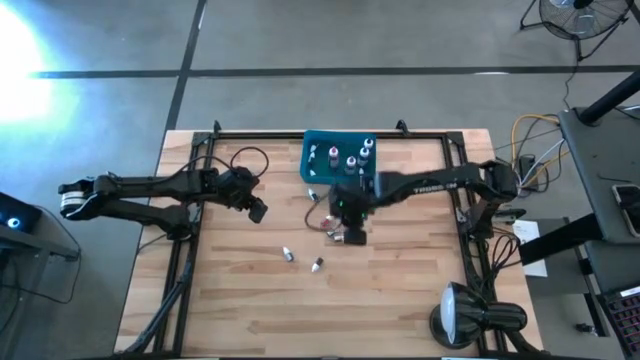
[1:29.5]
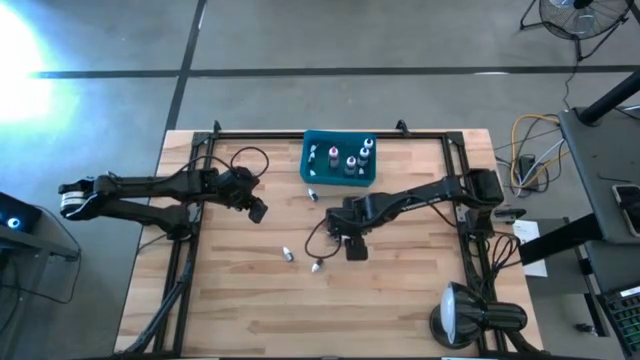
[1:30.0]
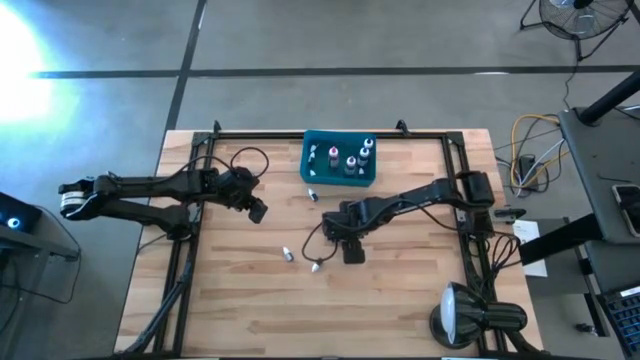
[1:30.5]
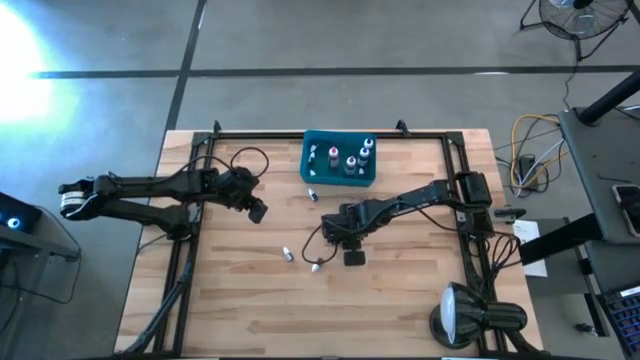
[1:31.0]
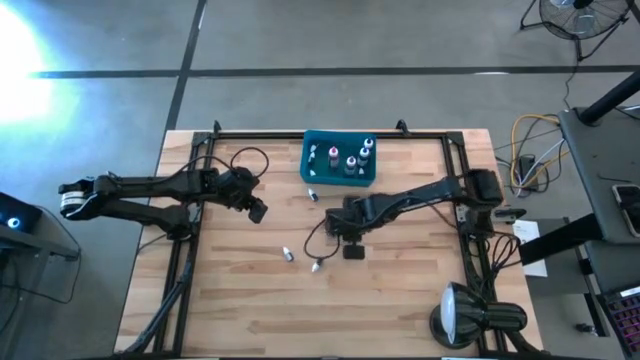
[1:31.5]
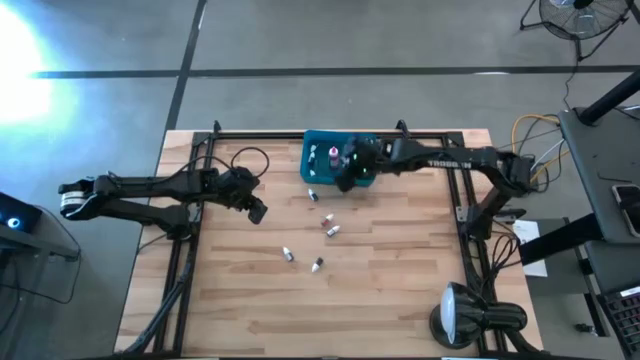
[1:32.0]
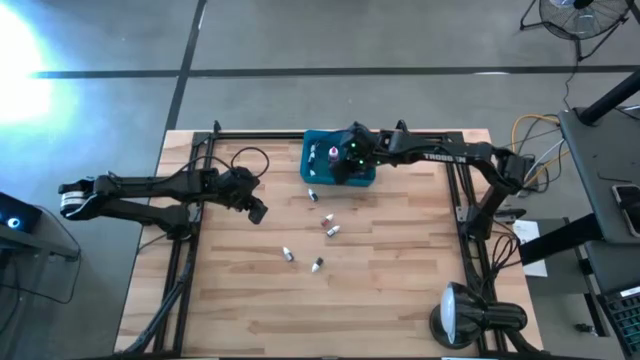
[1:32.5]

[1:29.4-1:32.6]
Task: Pick & Place food coloring
Put the bottom small red food coloring bottle into the blue bin

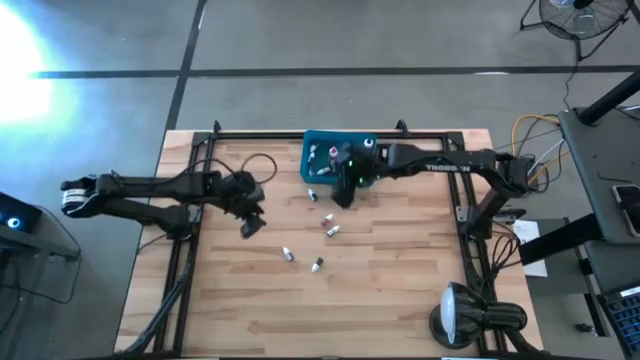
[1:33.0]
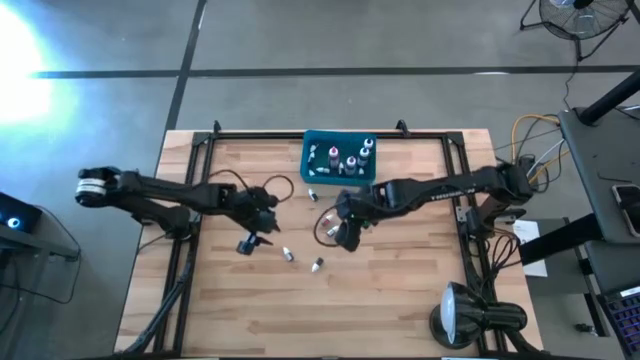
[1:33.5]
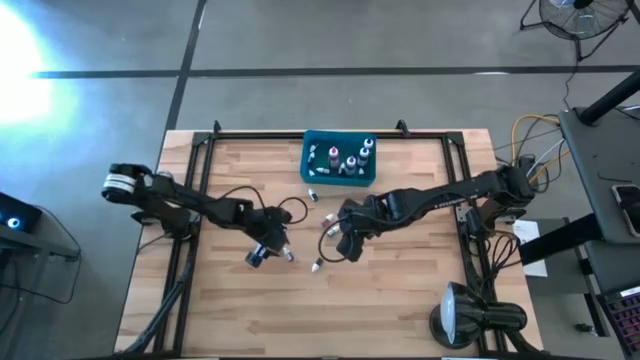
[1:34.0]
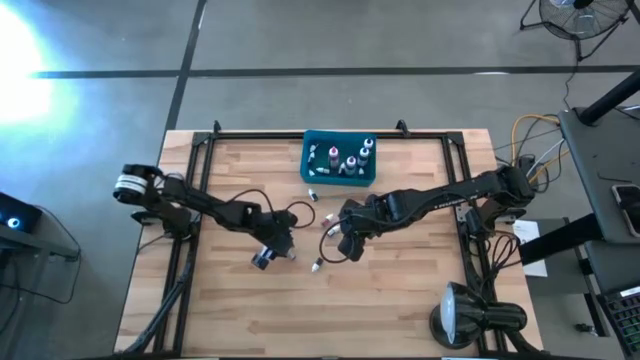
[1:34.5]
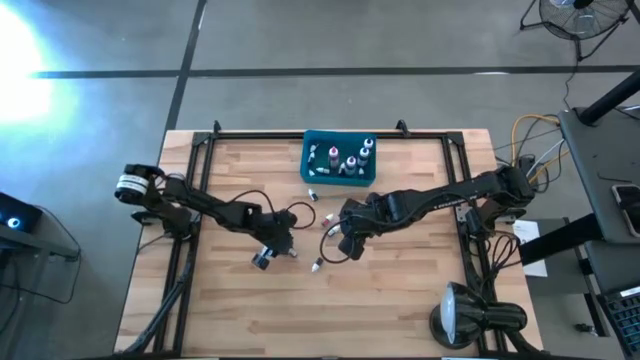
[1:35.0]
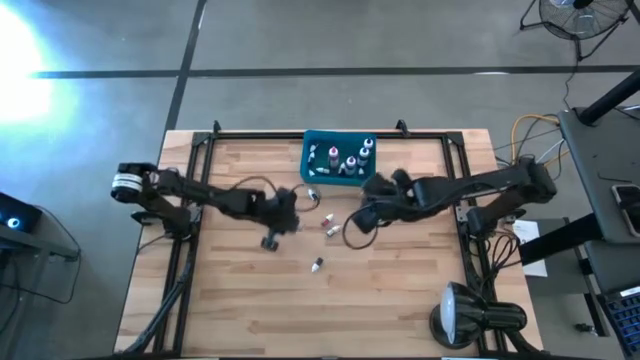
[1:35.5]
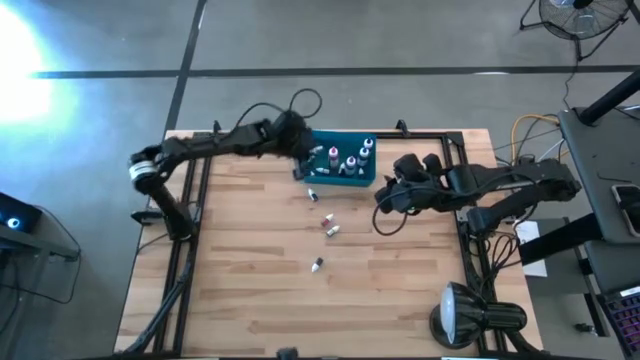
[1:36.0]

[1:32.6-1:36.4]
Put the small purple food coloring bottle into the blue bin

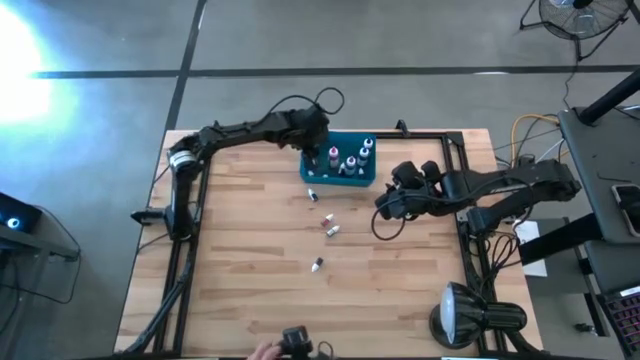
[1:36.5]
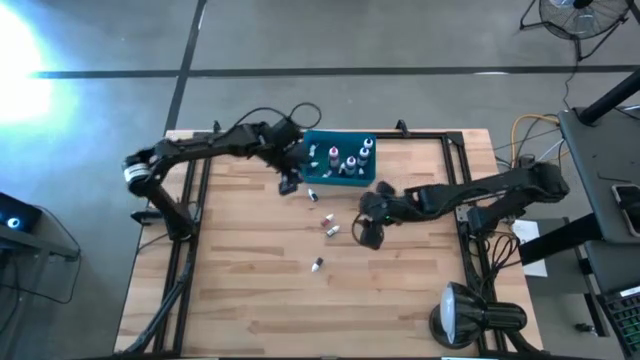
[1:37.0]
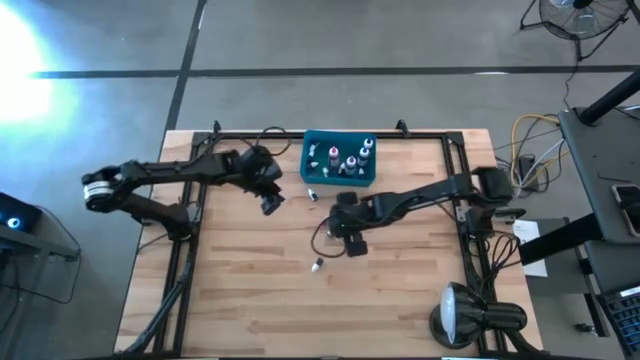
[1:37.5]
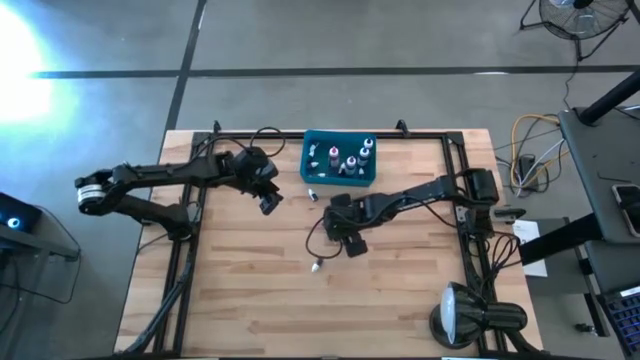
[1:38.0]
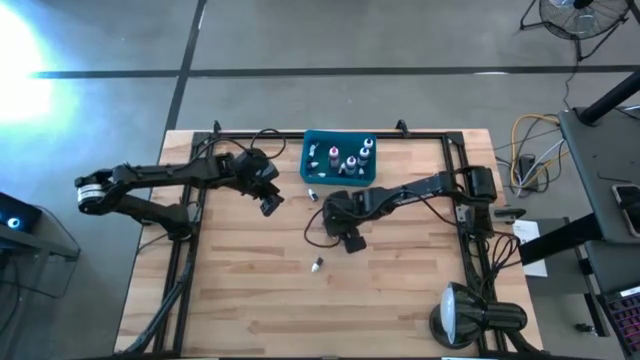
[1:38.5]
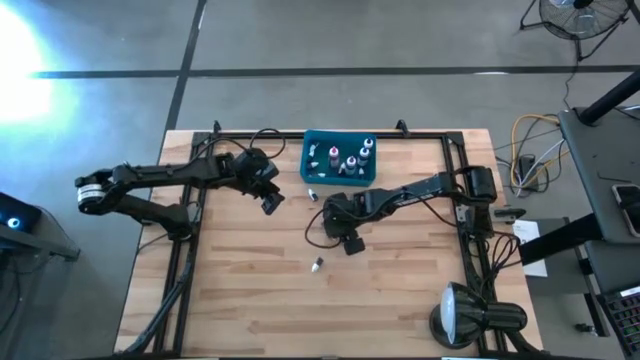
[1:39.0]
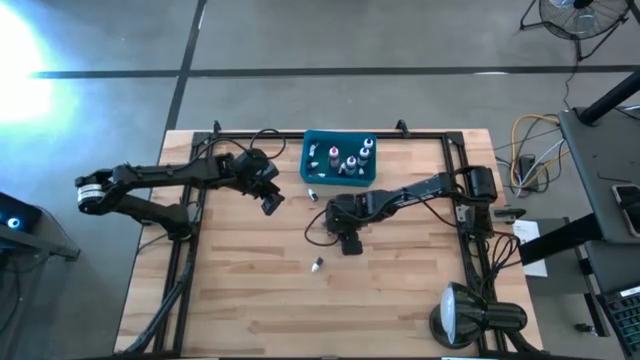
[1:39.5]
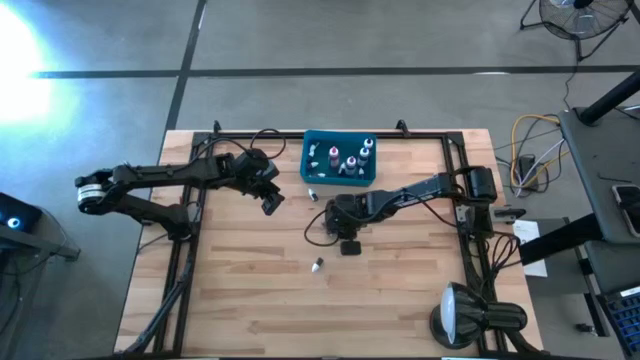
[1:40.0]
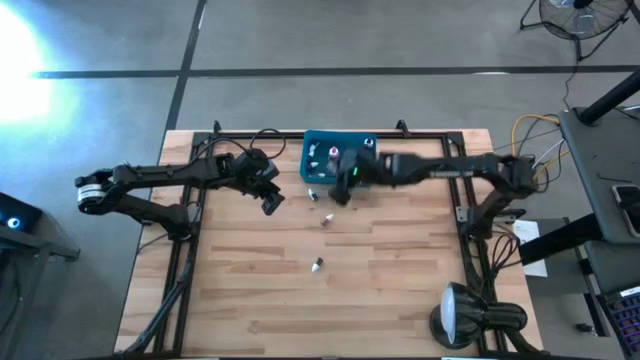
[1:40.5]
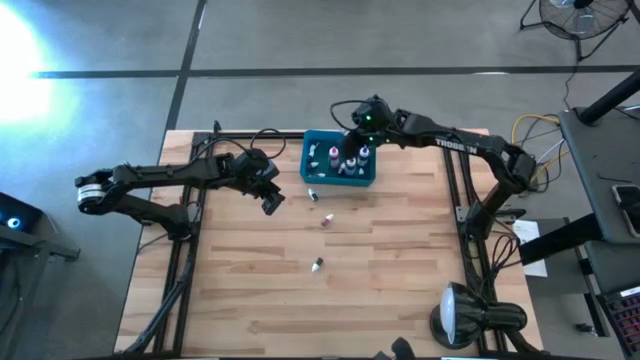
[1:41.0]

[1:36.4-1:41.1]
Put the small green food coloring bottle into the blue bin

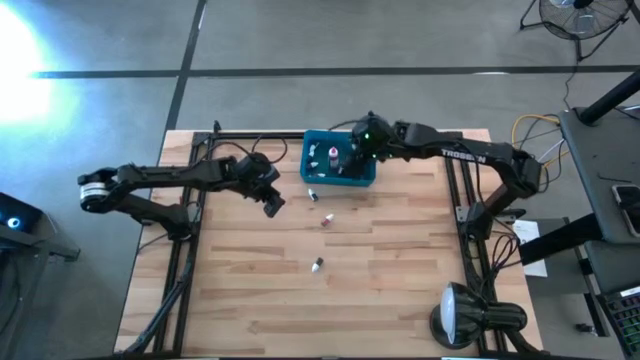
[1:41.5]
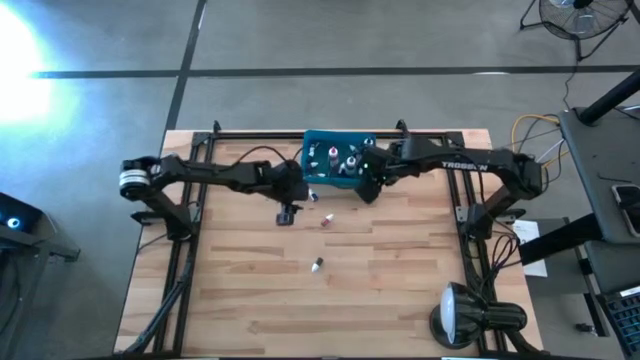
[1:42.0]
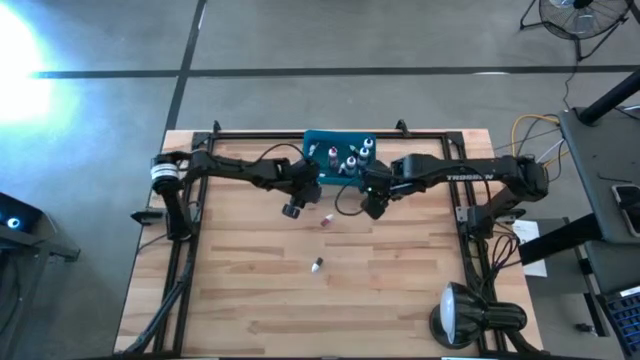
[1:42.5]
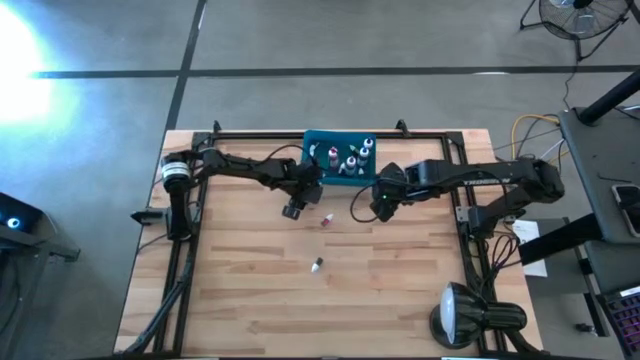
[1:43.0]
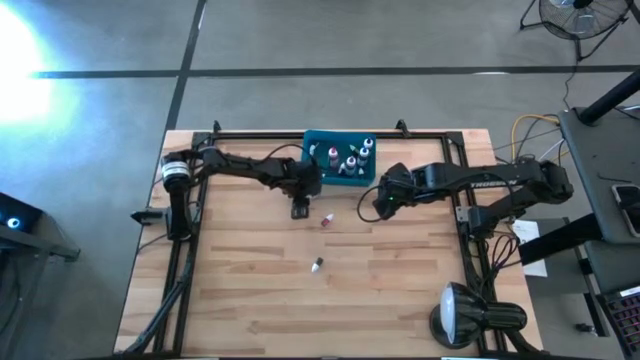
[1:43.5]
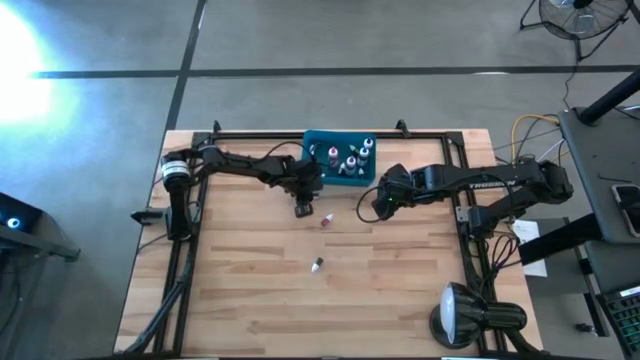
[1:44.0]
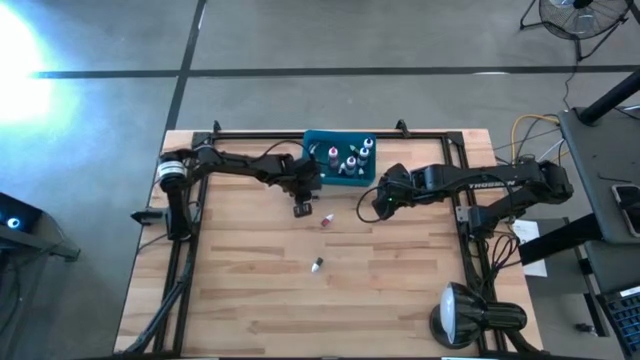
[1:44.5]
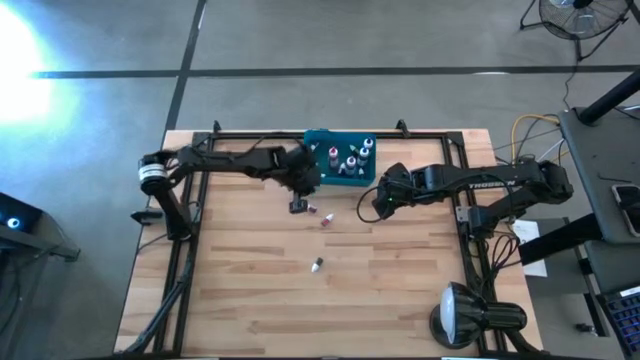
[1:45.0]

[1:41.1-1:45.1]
Put the small blue food coloring bottle into the blue bin

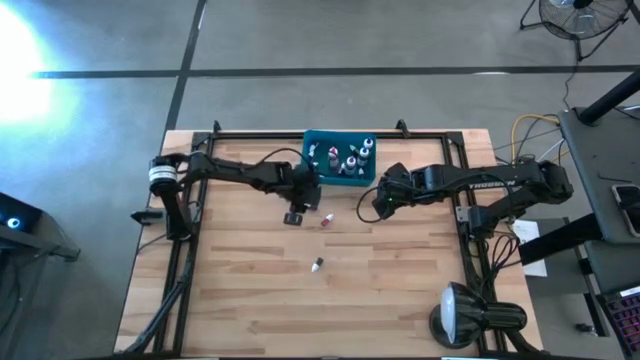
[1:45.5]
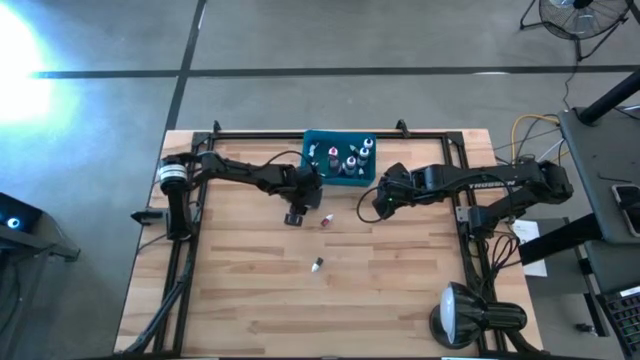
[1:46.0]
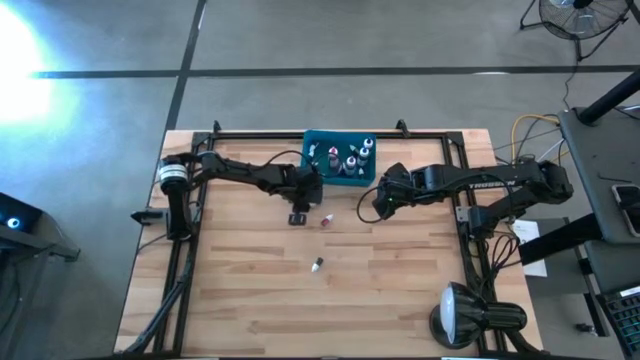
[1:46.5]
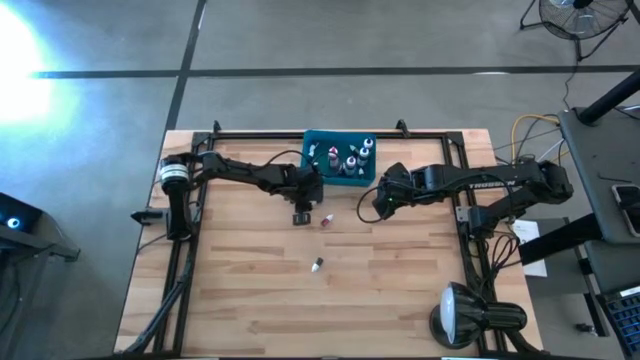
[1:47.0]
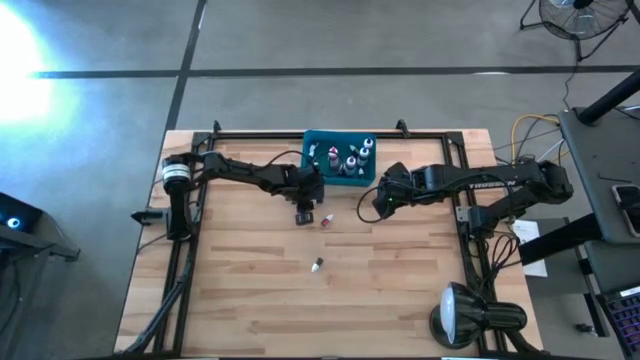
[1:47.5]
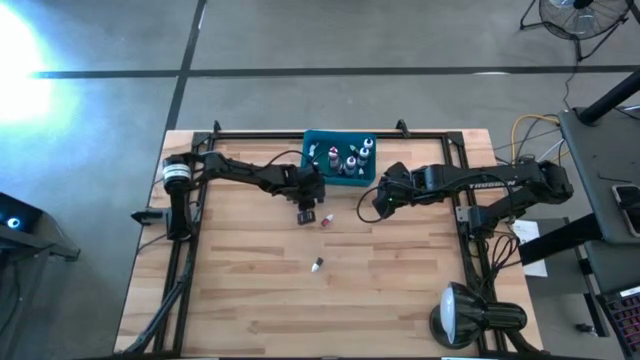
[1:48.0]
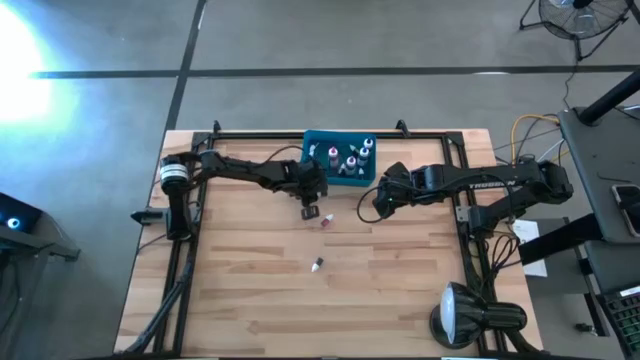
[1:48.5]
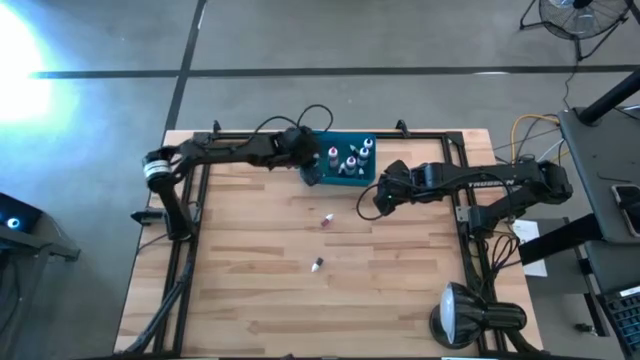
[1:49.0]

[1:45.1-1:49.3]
Put the small blue food coloring bottle into the blue bin

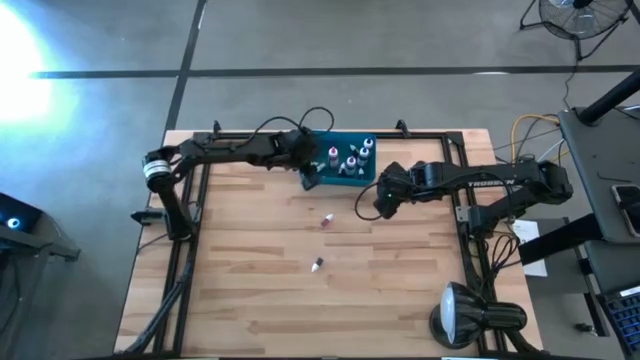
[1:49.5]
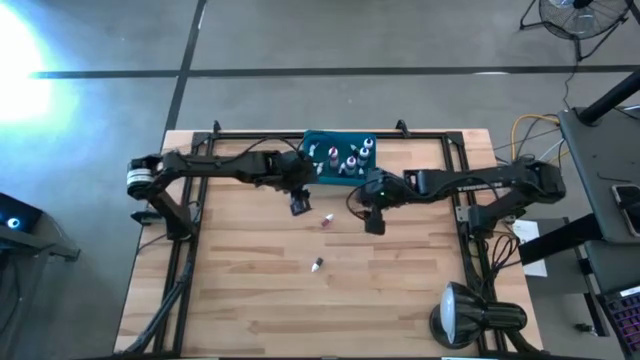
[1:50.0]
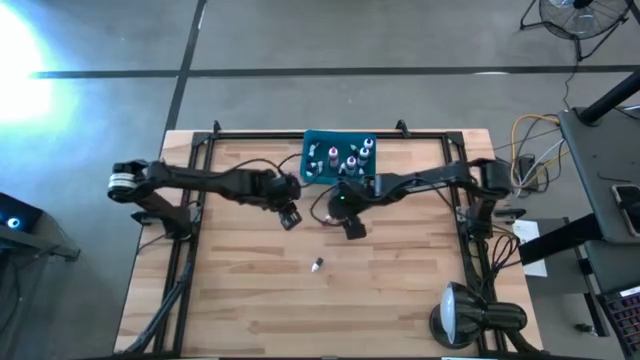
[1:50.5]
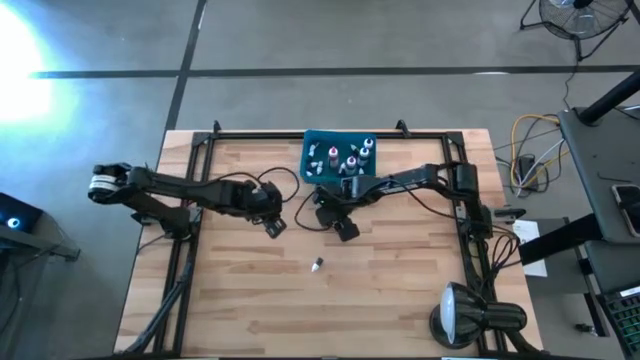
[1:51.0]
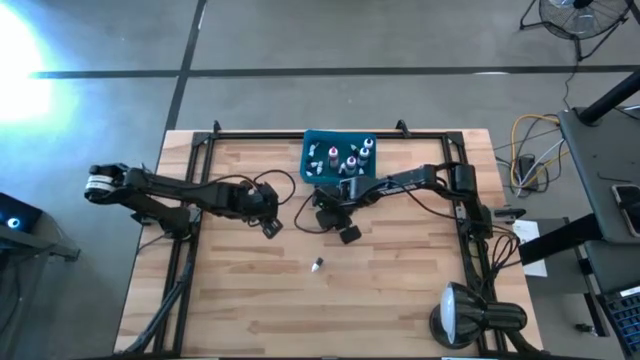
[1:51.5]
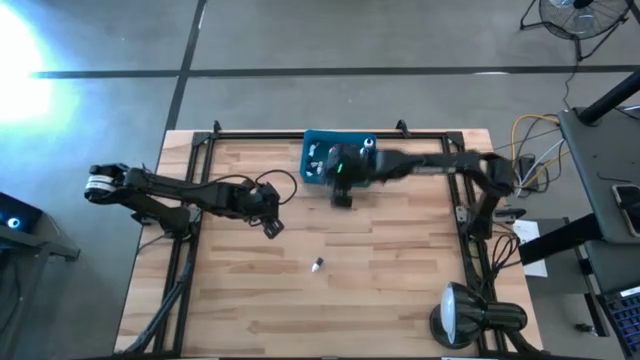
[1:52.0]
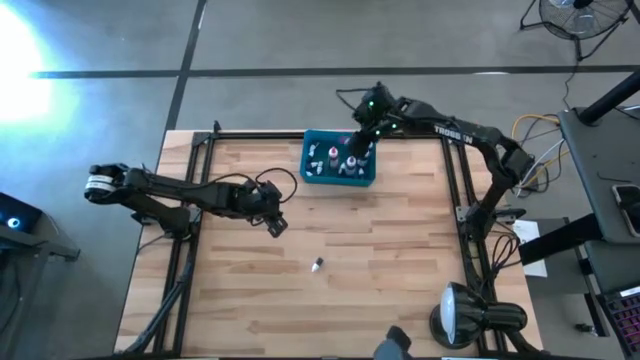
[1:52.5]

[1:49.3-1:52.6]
Put the small red food coloring bottle into the blue bin
